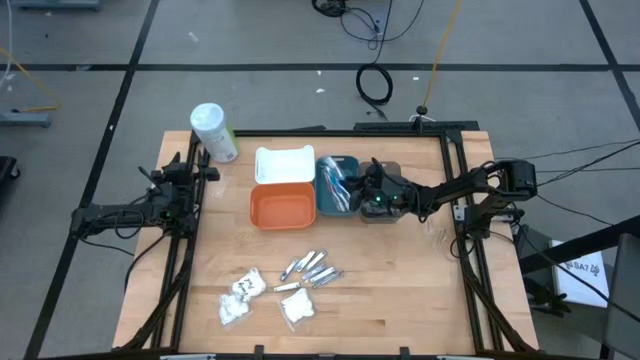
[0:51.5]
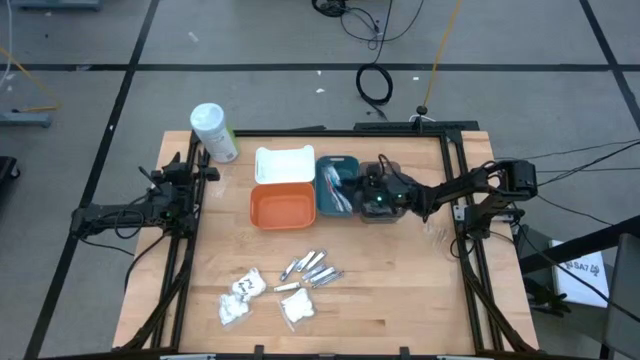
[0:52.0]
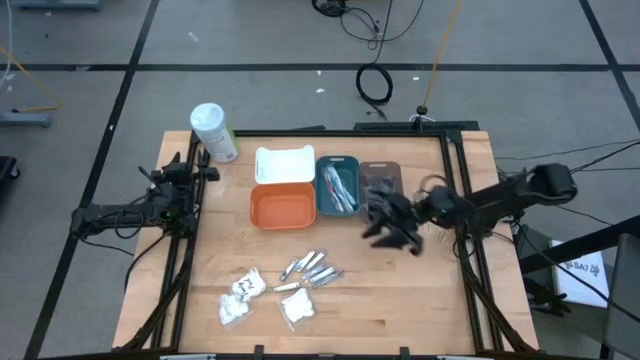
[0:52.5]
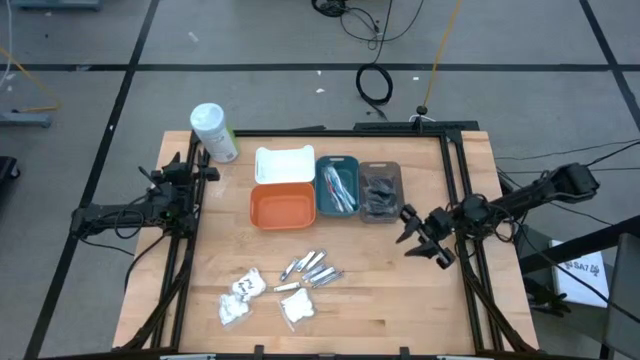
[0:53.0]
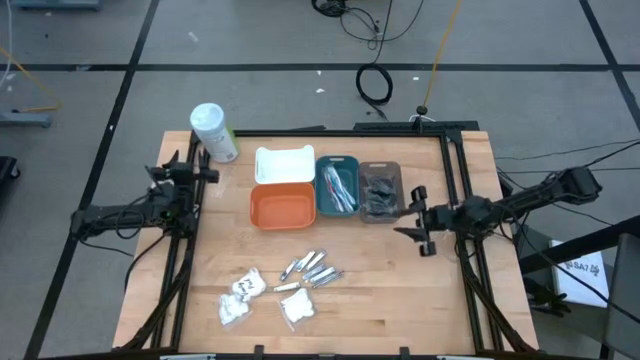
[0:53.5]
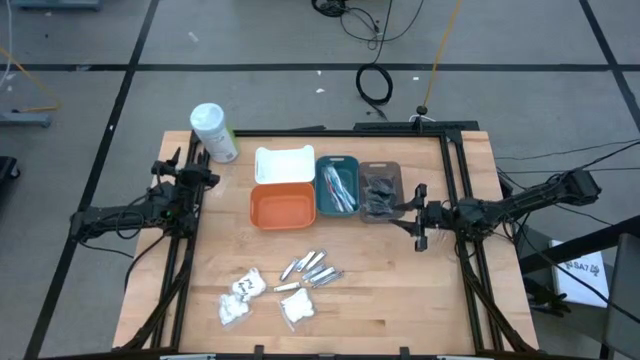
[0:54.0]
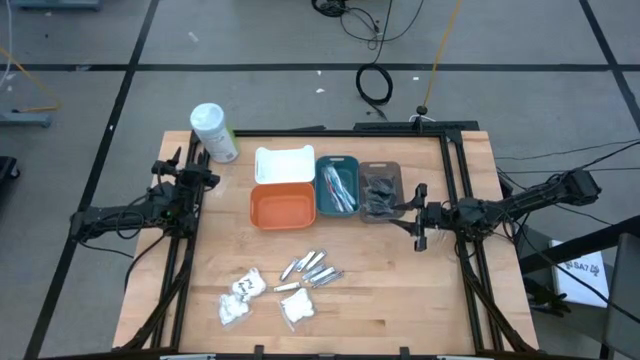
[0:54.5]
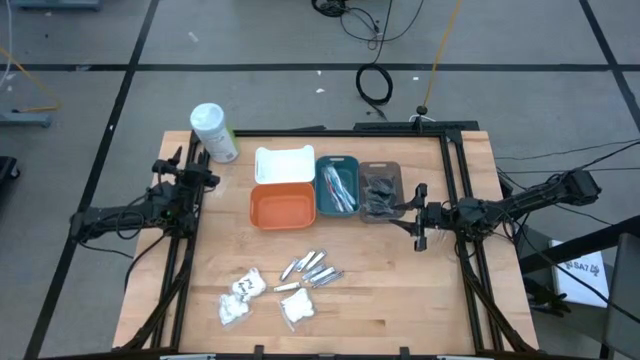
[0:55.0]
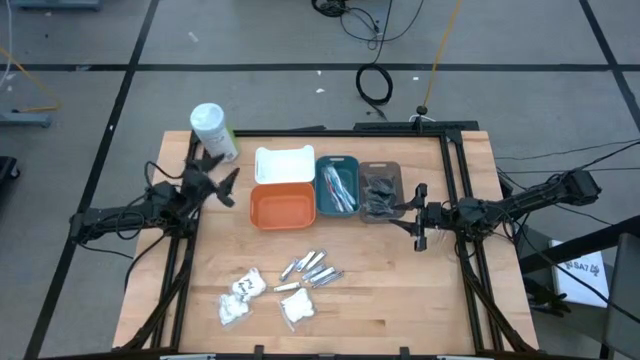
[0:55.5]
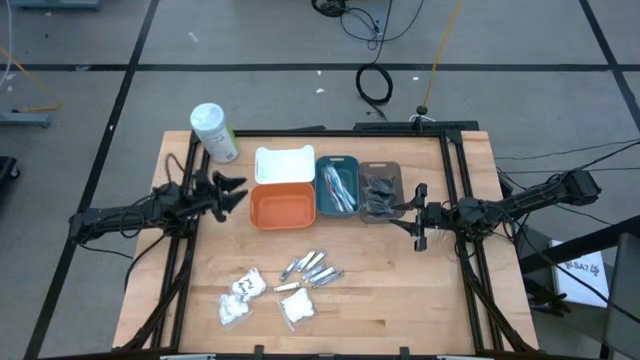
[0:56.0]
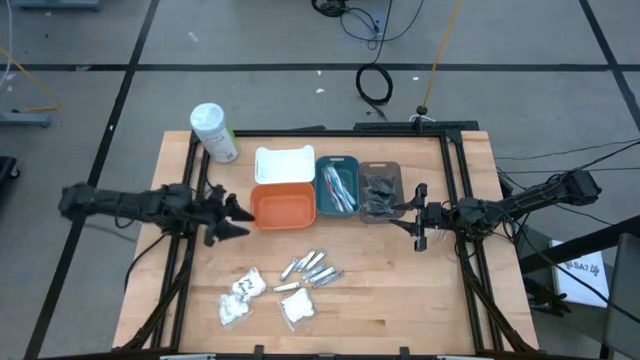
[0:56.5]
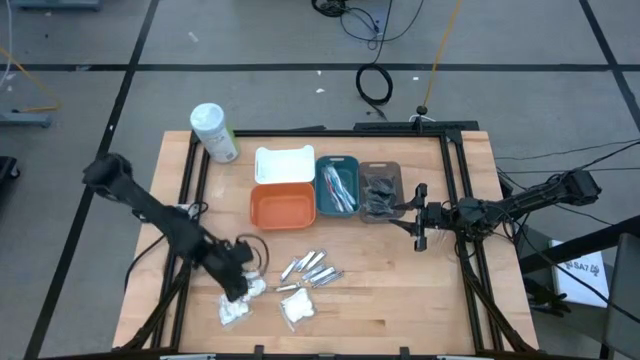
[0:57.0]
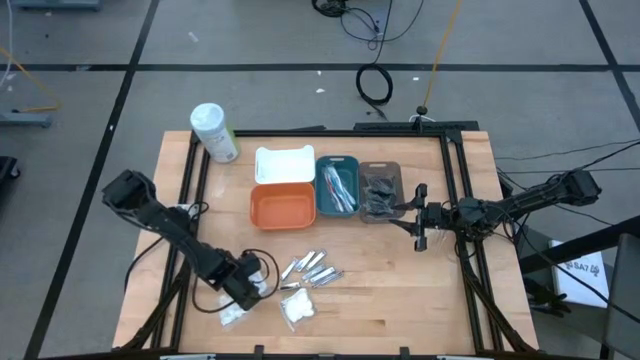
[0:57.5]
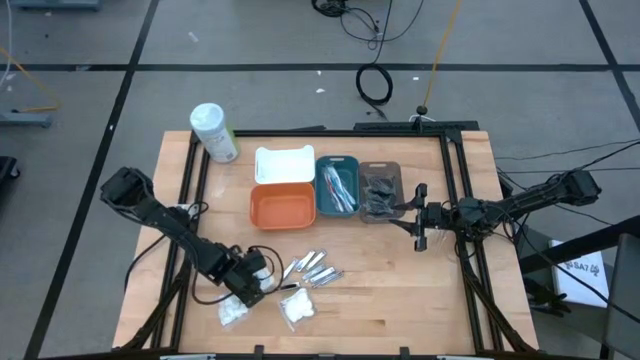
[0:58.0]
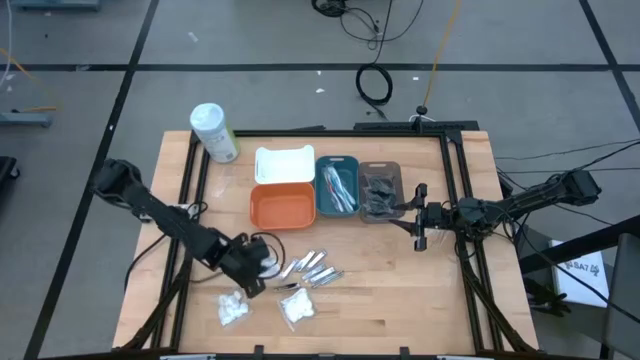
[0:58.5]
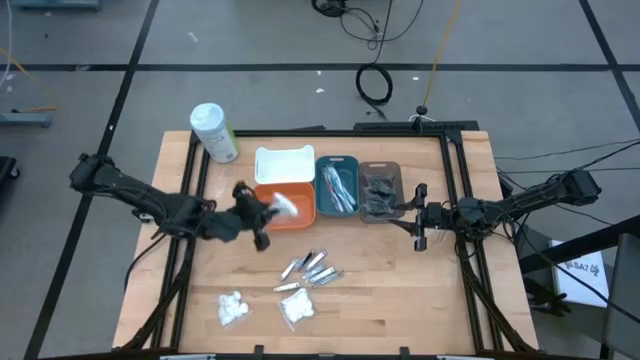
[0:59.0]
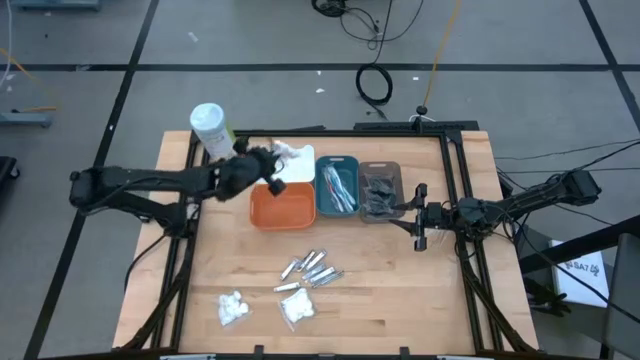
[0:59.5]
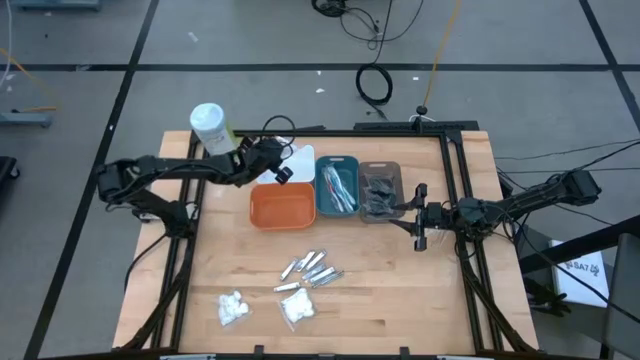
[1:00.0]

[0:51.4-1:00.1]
Task: Pick & Place Travel size toiletries
Put the cotton pack into the white bin

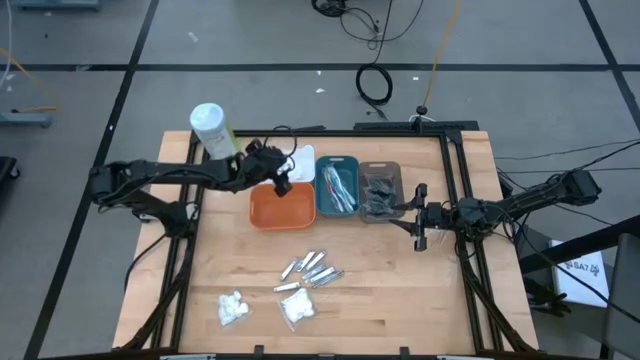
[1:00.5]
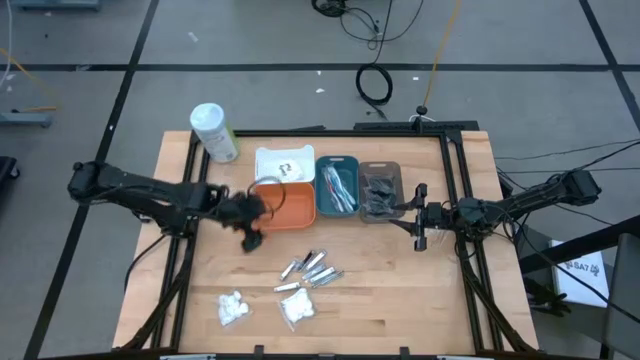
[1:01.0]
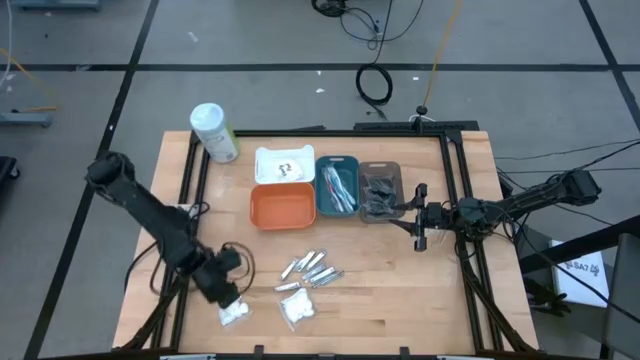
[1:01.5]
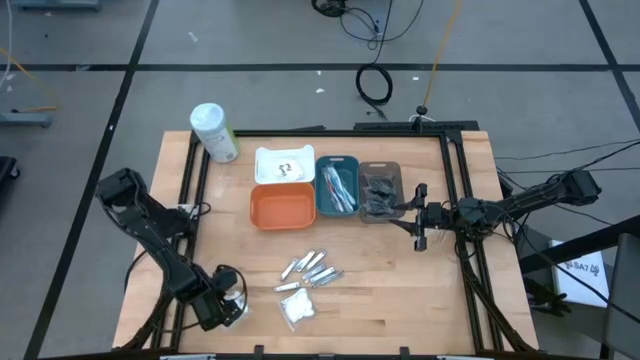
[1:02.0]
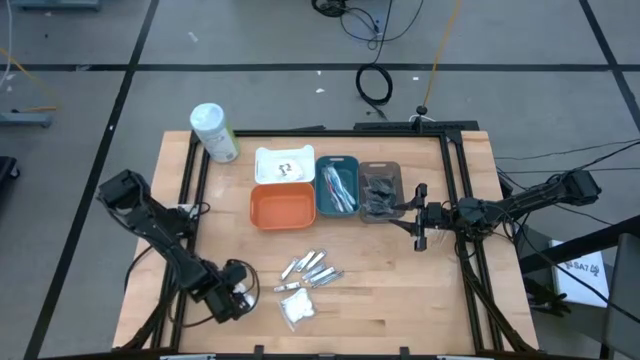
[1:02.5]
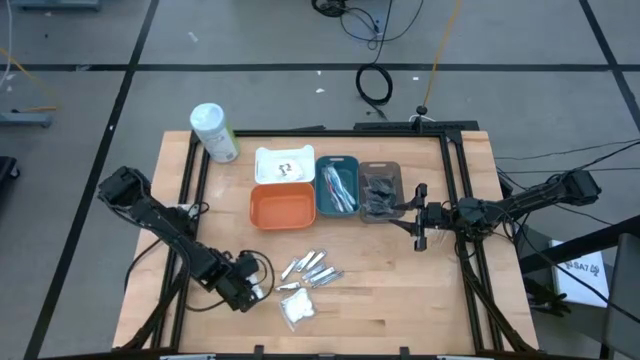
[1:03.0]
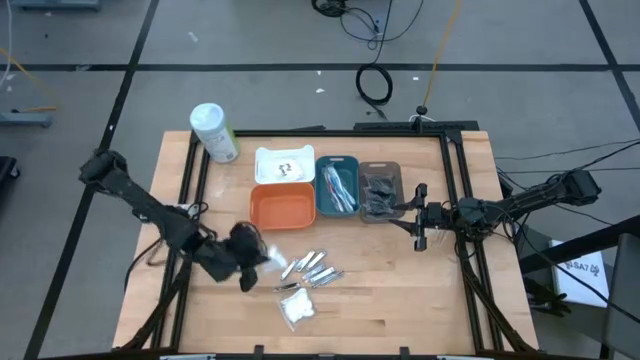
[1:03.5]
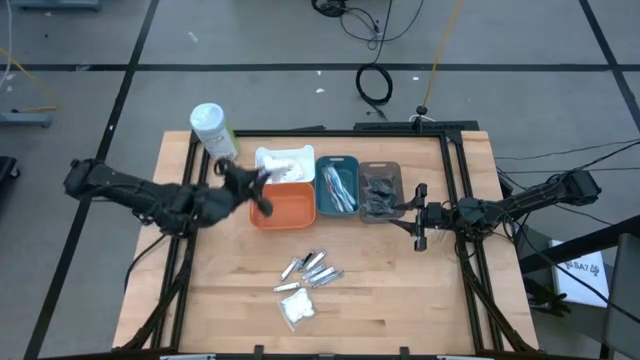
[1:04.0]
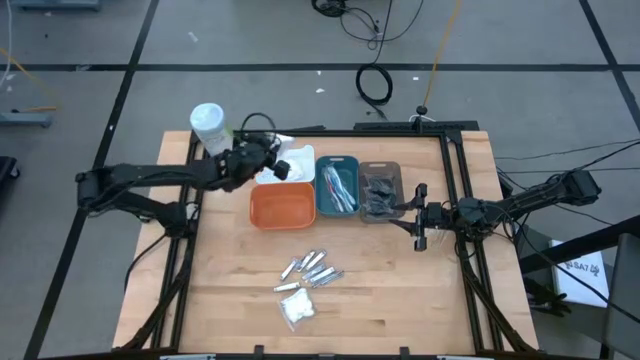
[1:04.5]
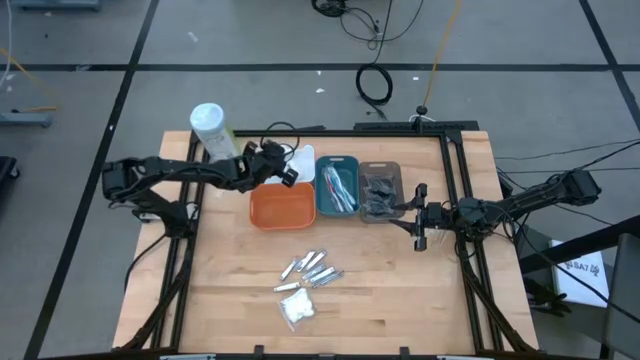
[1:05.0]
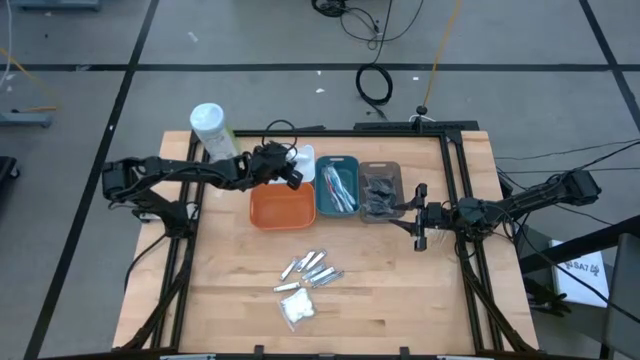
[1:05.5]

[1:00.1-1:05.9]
Put the cotton pack into the white bin

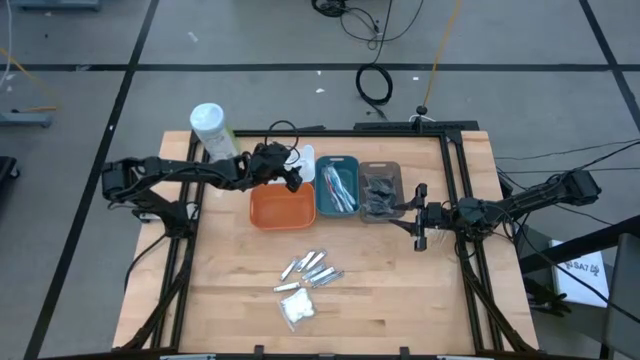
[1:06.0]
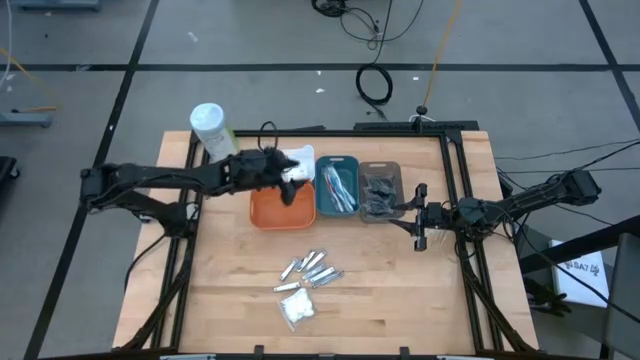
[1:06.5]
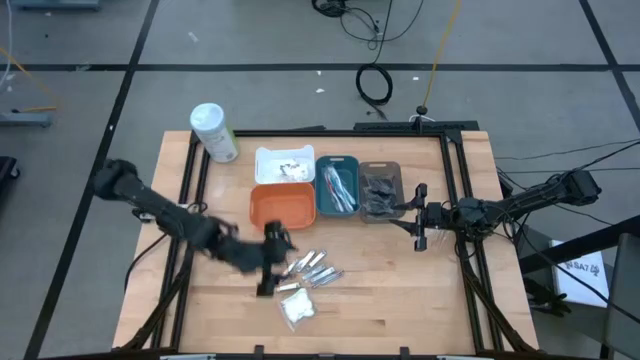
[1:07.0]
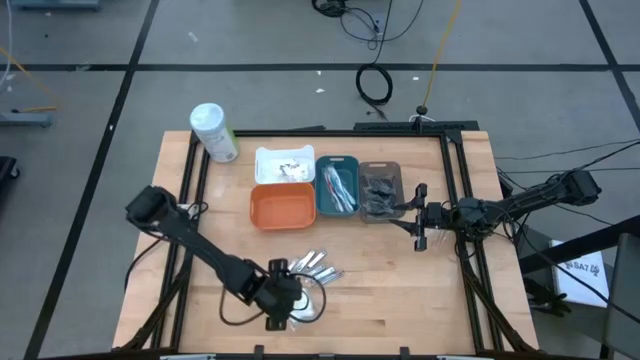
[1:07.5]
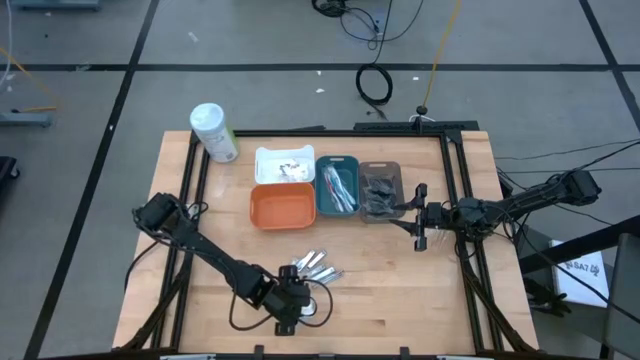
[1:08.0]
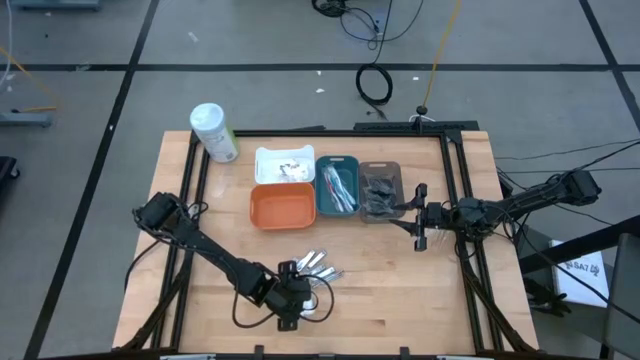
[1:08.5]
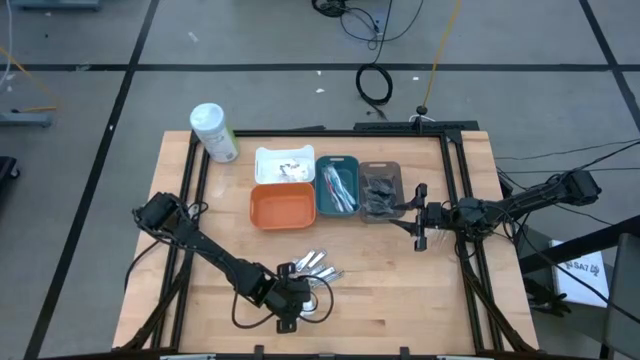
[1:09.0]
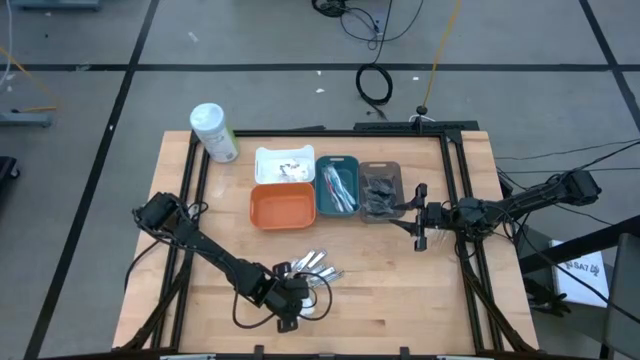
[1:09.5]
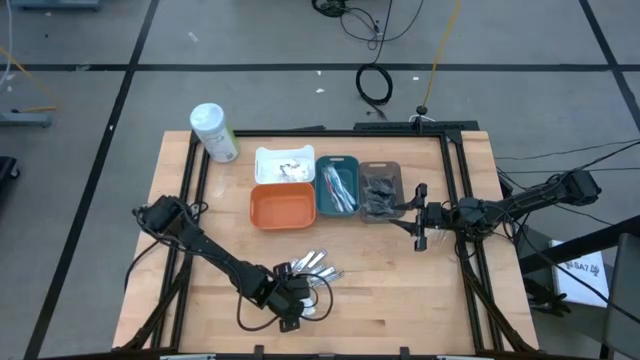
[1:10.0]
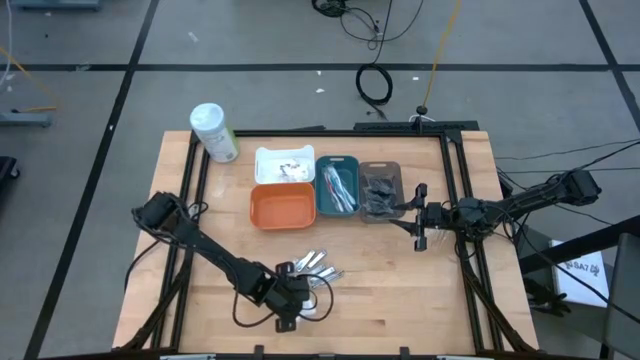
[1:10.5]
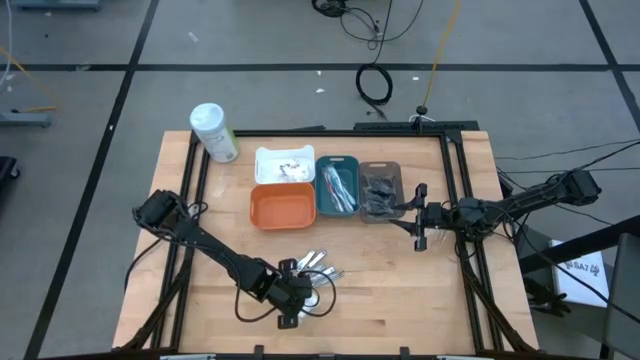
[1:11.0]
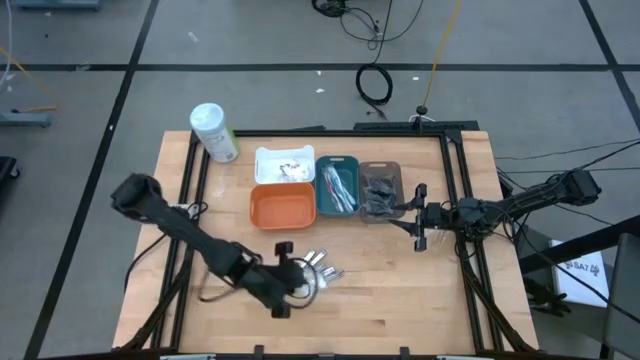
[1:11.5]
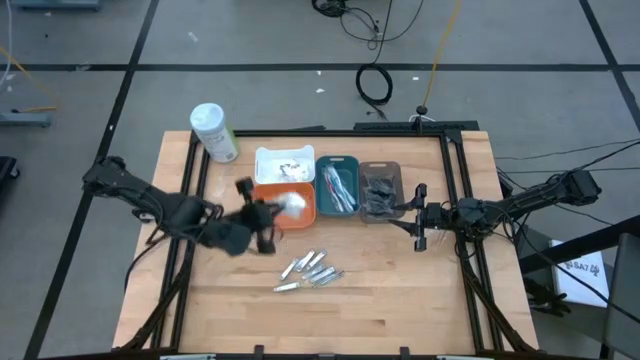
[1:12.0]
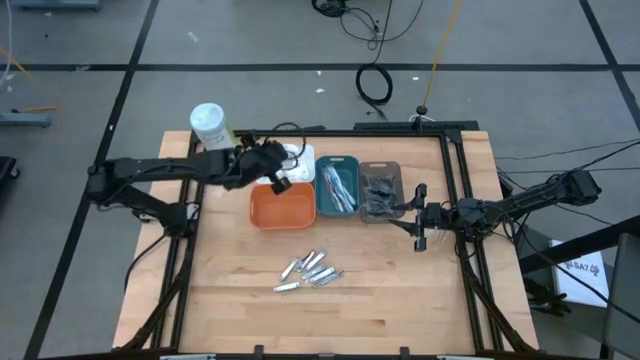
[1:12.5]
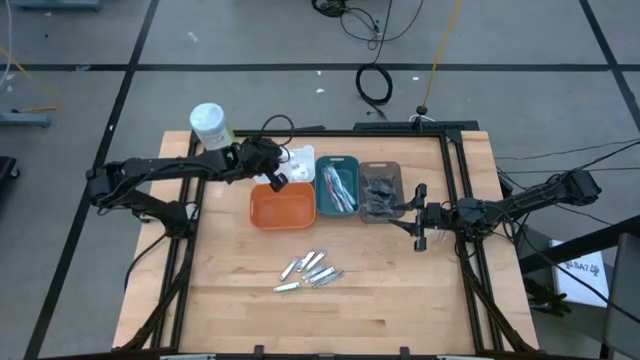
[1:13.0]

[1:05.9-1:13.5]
Put the cotton pack into the white bin

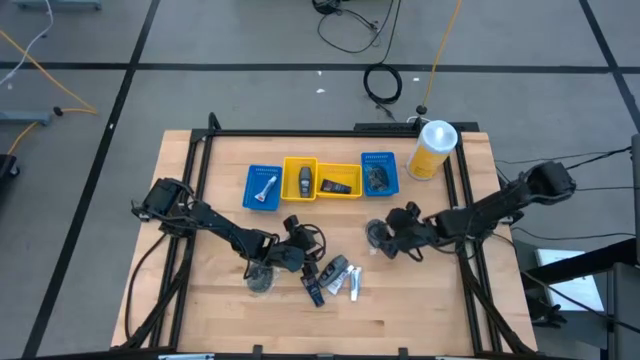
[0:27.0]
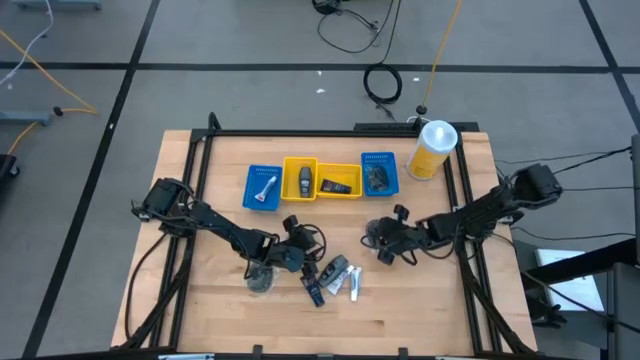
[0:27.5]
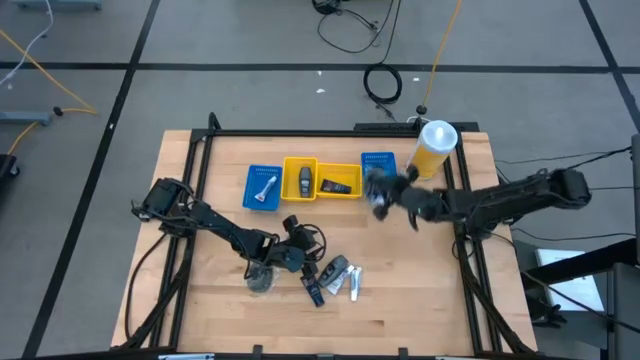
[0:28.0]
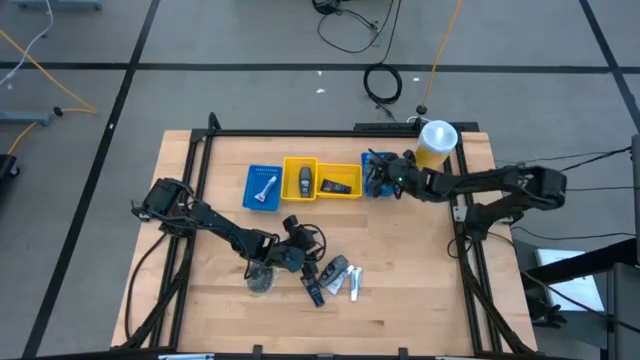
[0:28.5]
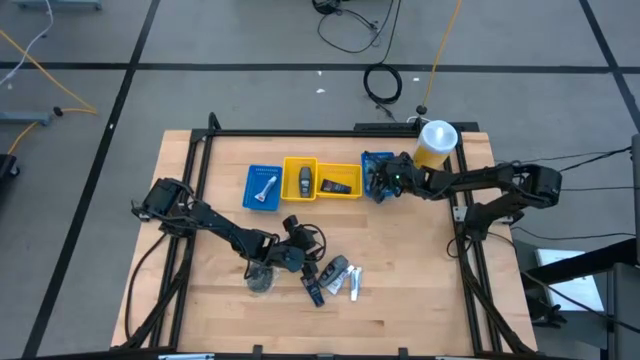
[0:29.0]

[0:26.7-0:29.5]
Task: Pick & Place Travel size toiletries
Put the hairbrush into the right blue basket
